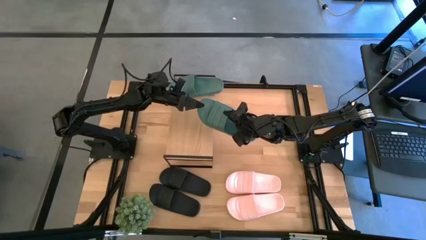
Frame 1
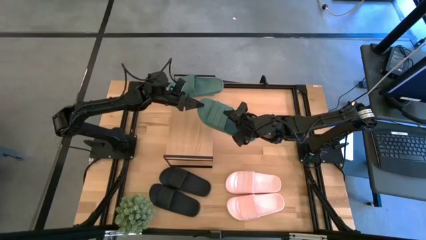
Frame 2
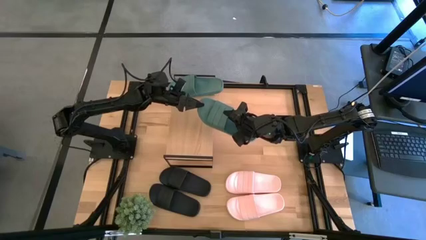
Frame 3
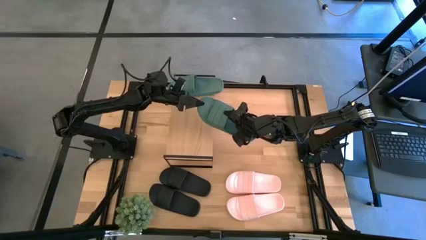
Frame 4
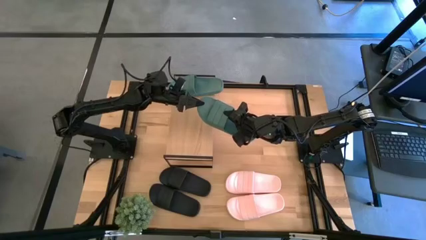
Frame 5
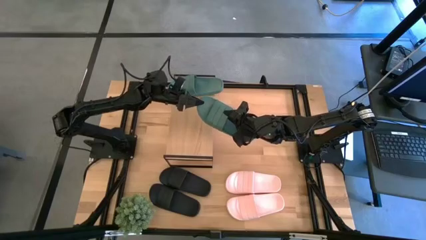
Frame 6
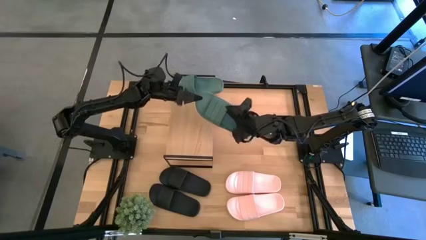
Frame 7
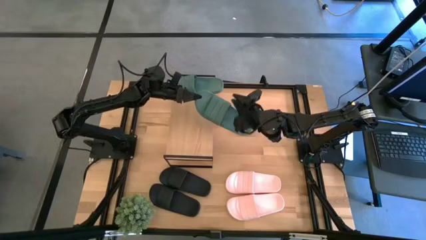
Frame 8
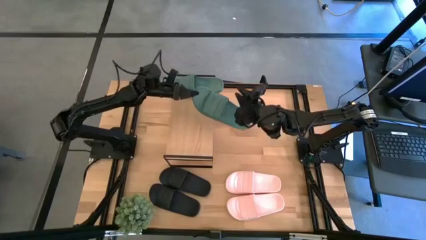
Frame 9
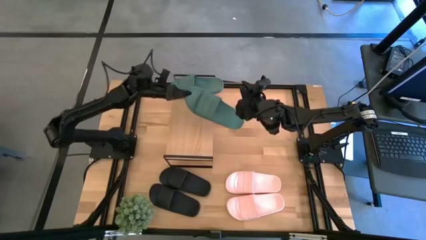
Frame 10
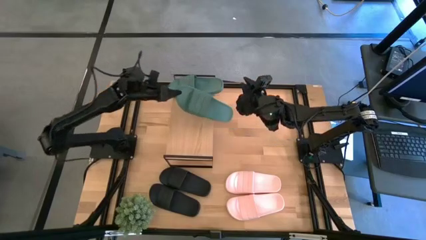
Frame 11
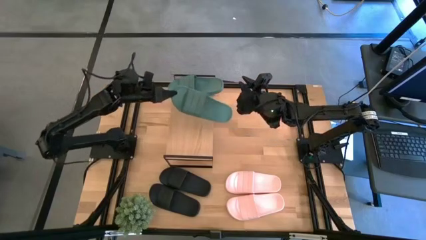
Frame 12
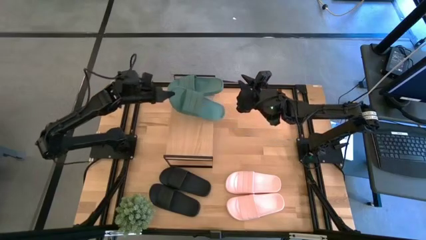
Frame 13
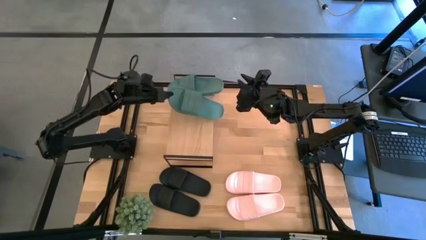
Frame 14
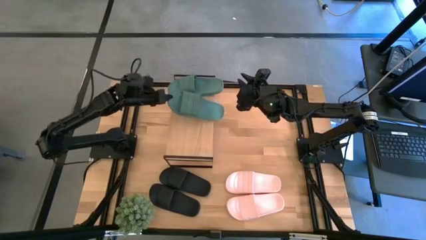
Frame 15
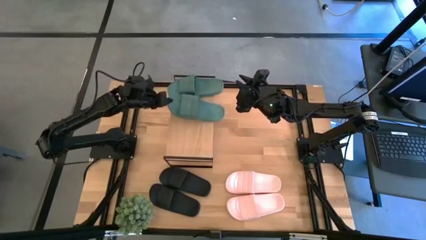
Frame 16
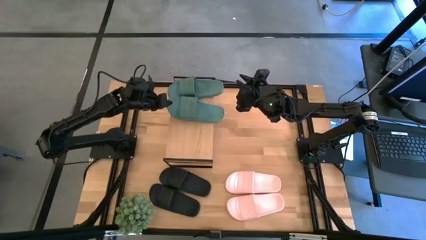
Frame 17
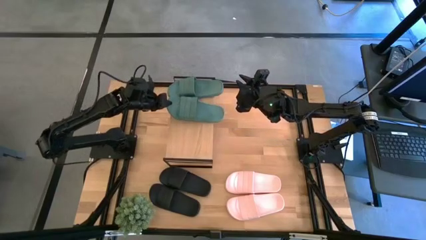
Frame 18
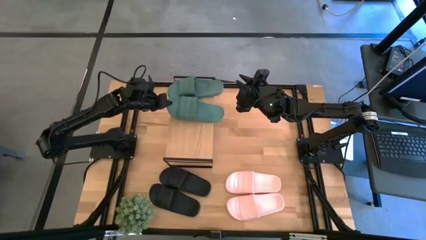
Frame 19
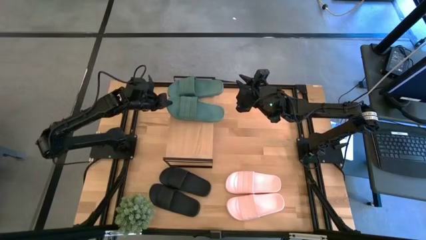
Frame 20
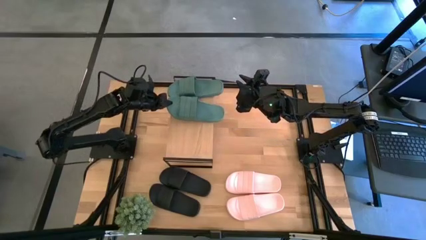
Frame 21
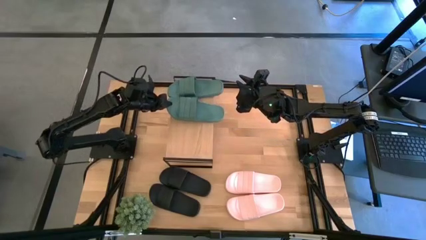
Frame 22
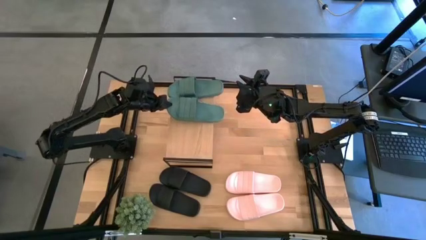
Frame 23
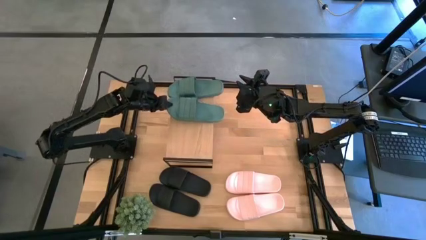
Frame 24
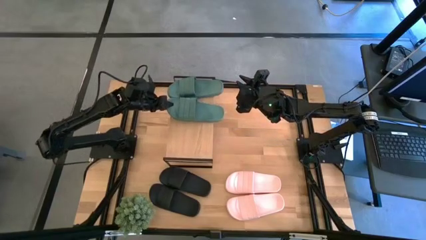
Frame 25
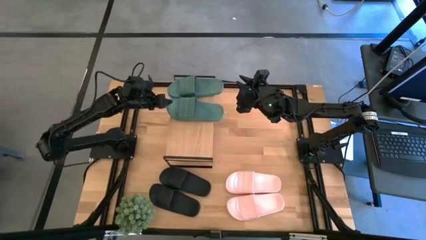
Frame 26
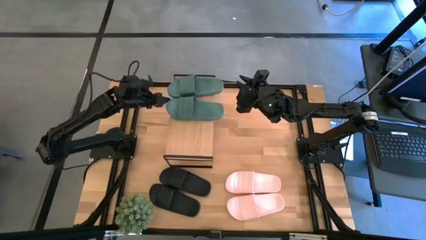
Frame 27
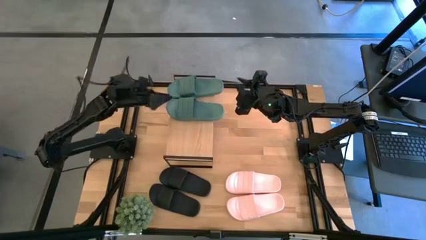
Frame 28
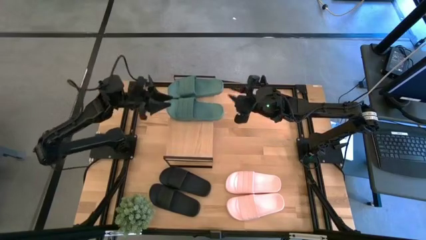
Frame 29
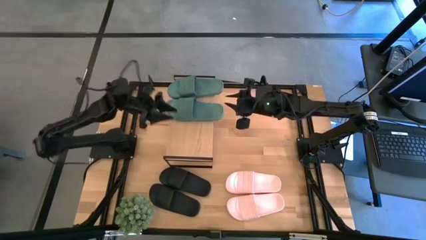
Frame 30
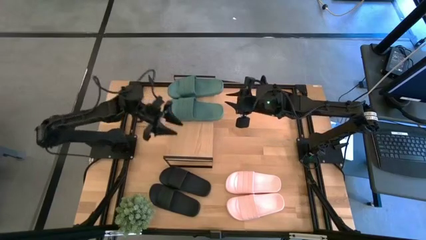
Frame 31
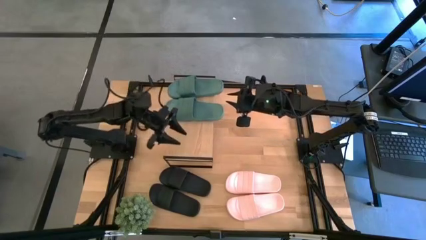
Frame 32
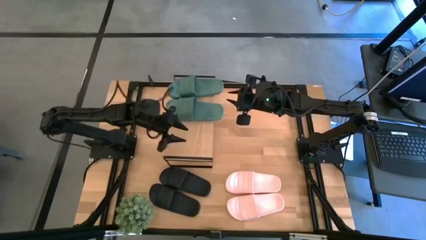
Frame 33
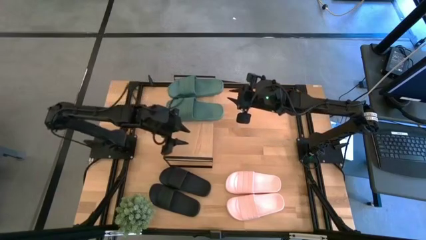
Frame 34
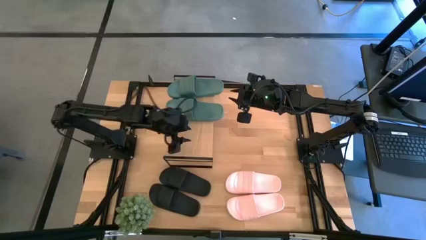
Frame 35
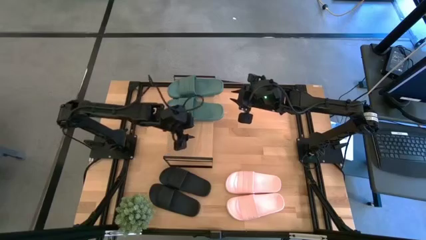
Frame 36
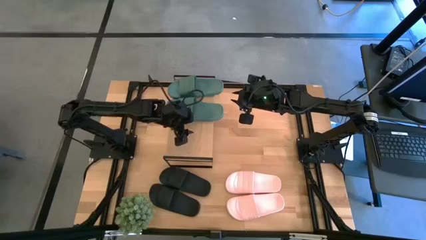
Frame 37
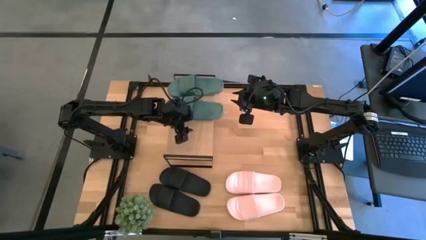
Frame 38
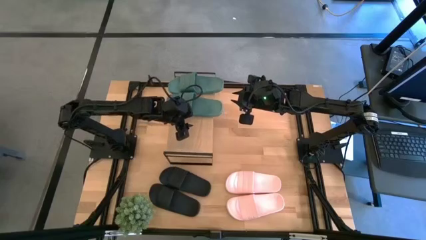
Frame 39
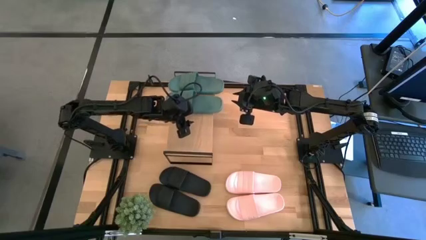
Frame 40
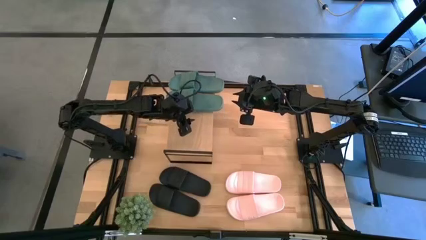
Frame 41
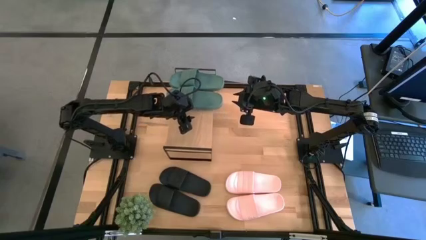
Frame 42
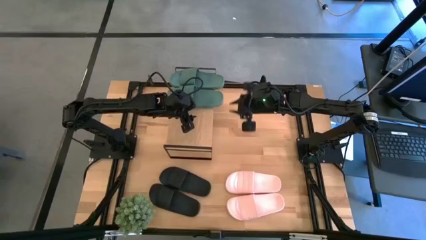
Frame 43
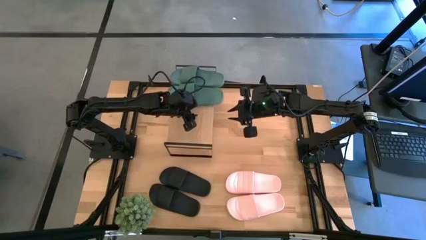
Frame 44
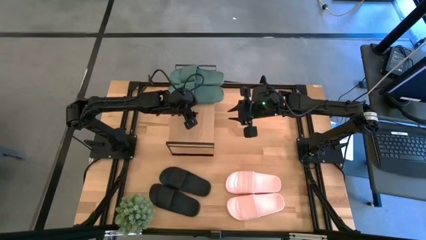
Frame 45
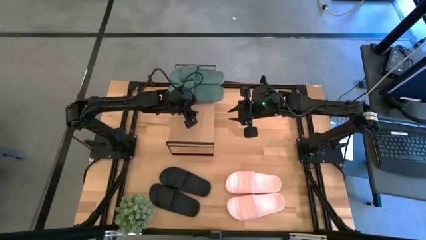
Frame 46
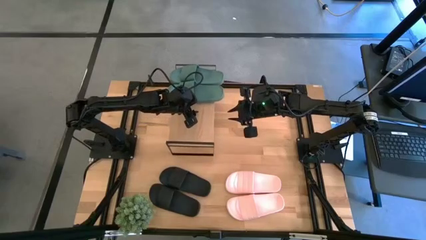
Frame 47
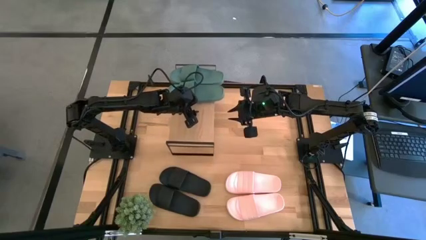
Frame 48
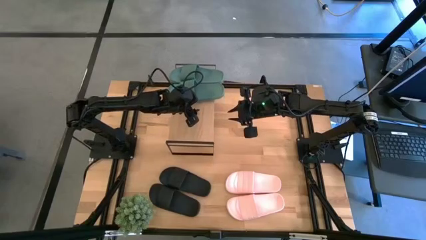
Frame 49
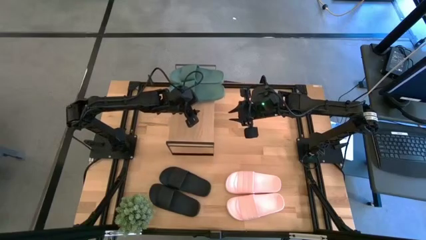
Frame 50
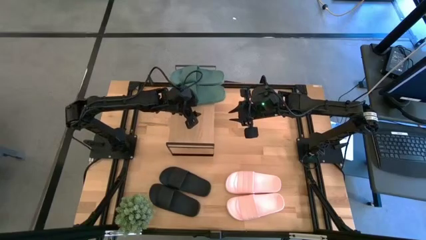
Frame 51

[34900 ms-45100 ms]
Task: Pick and place slides into the shelf
Put the green slipper on the shelf
